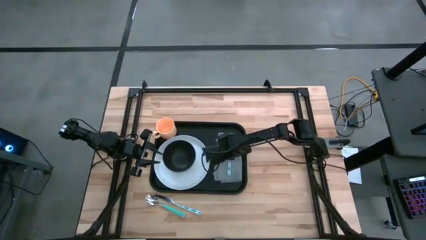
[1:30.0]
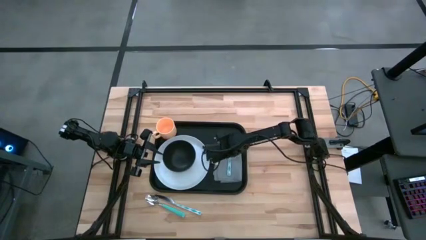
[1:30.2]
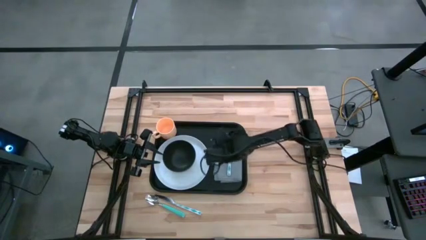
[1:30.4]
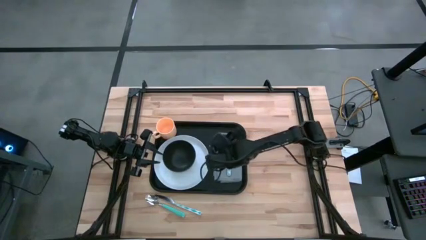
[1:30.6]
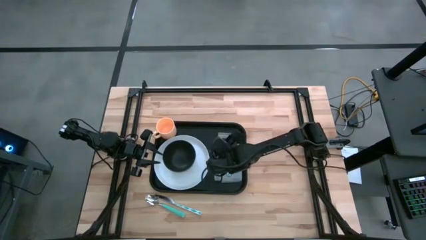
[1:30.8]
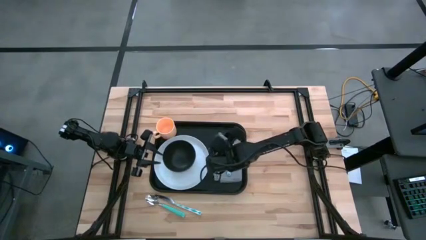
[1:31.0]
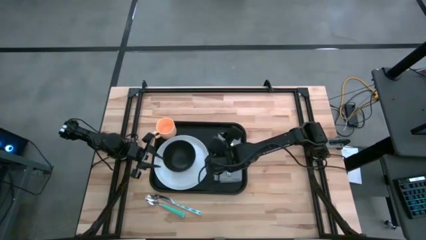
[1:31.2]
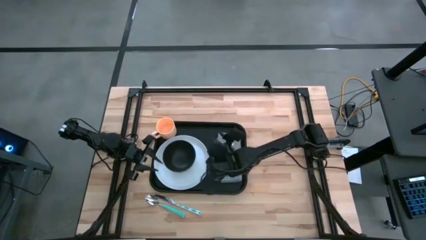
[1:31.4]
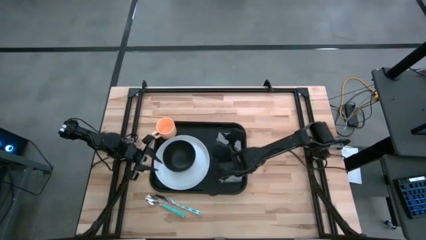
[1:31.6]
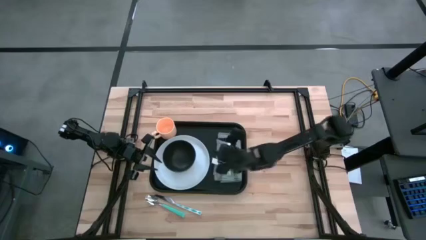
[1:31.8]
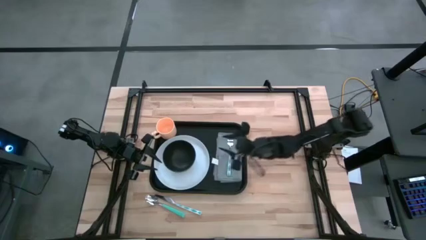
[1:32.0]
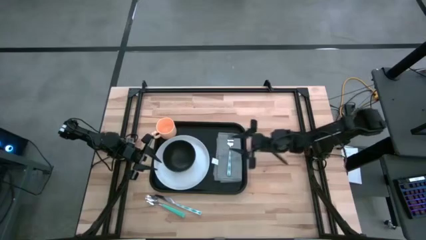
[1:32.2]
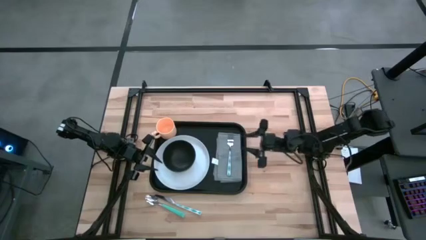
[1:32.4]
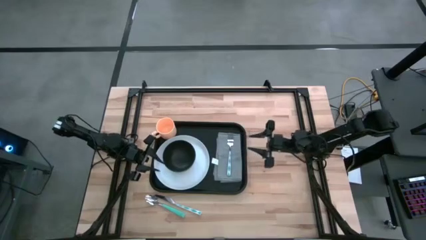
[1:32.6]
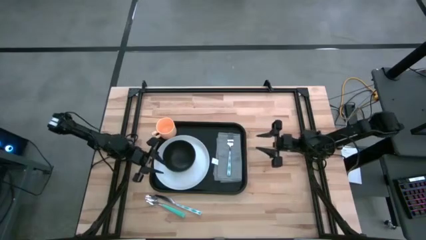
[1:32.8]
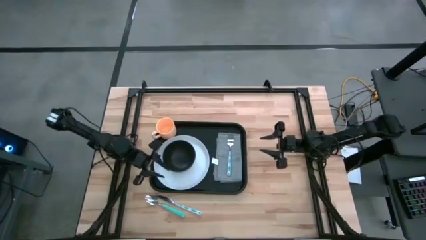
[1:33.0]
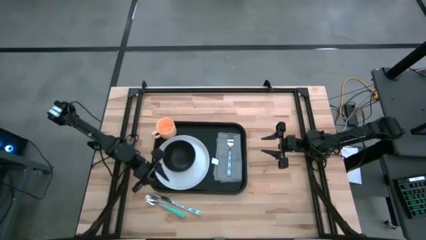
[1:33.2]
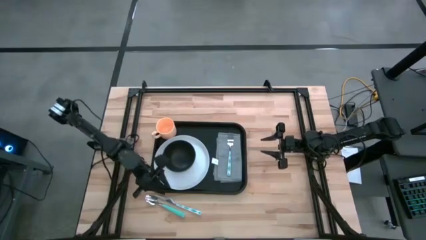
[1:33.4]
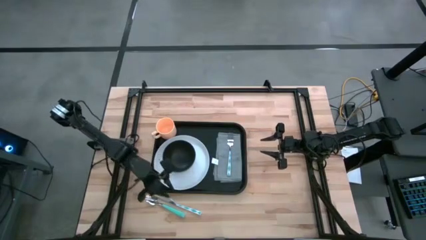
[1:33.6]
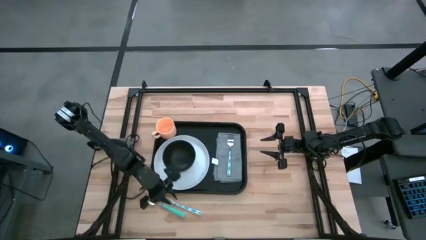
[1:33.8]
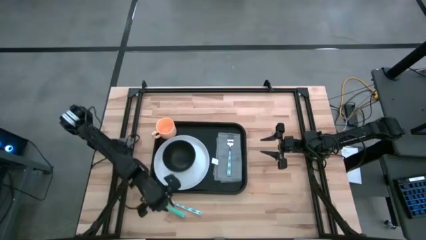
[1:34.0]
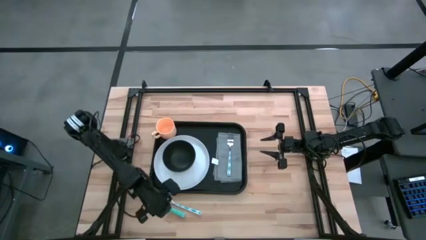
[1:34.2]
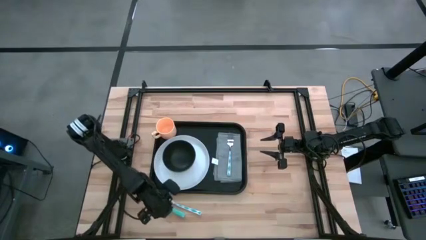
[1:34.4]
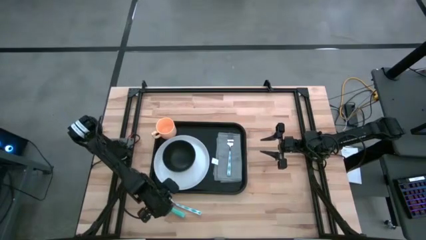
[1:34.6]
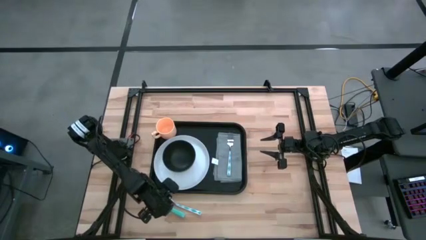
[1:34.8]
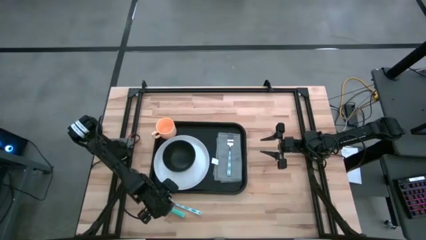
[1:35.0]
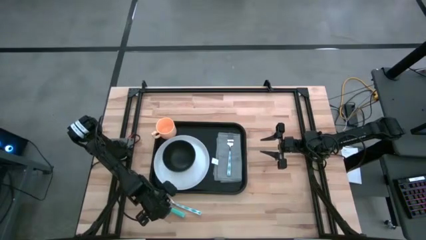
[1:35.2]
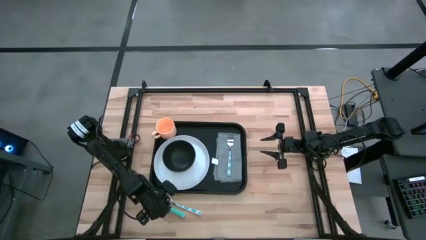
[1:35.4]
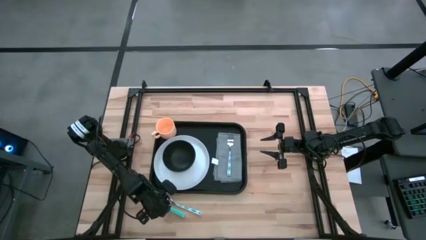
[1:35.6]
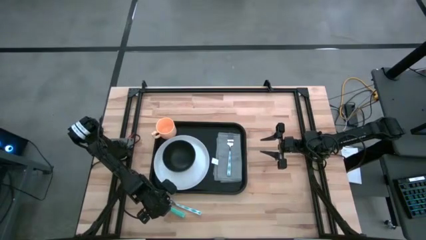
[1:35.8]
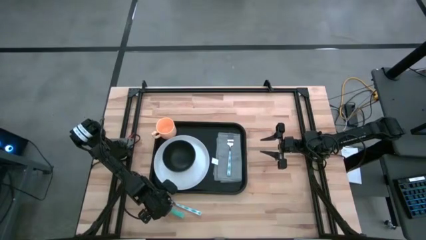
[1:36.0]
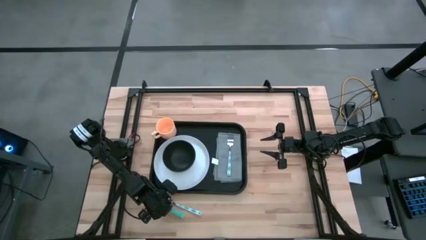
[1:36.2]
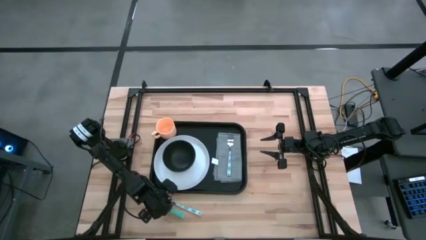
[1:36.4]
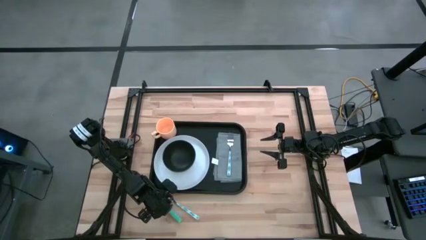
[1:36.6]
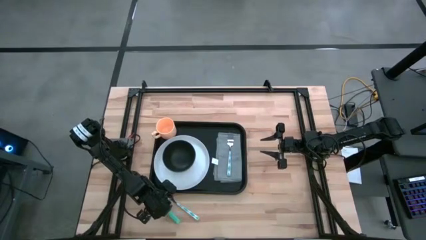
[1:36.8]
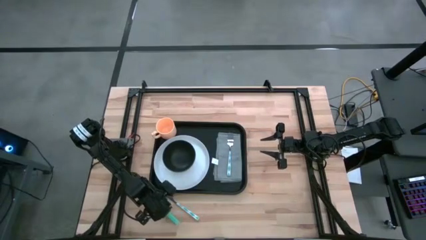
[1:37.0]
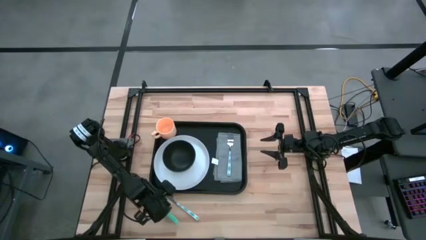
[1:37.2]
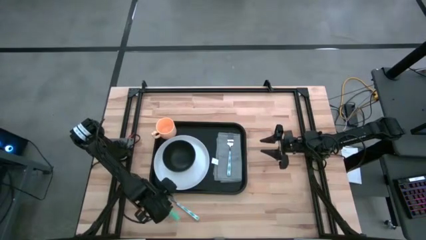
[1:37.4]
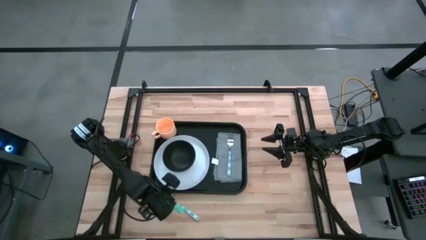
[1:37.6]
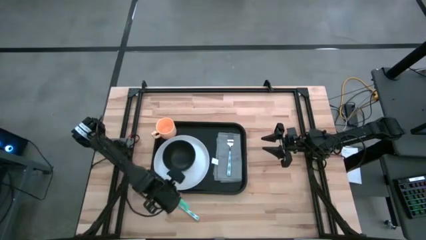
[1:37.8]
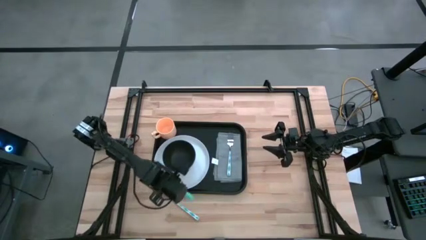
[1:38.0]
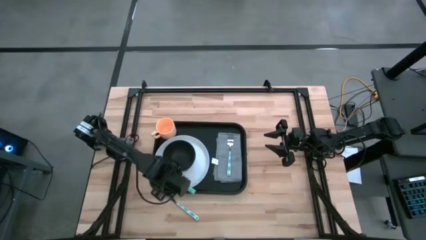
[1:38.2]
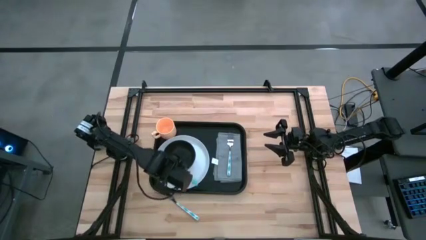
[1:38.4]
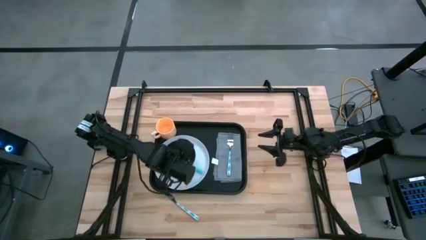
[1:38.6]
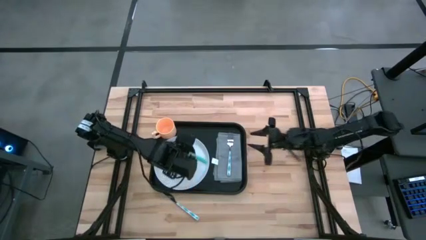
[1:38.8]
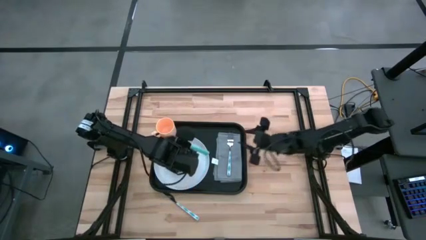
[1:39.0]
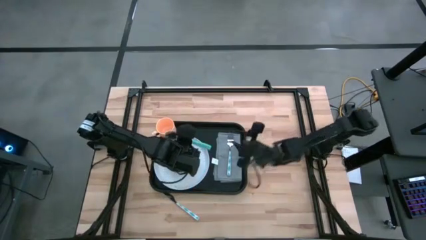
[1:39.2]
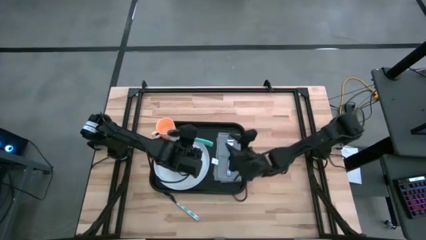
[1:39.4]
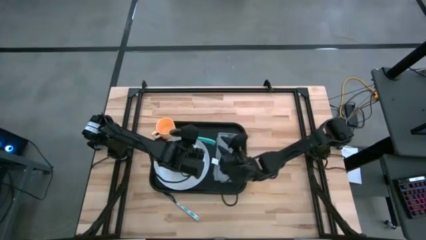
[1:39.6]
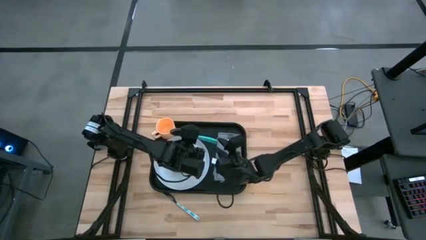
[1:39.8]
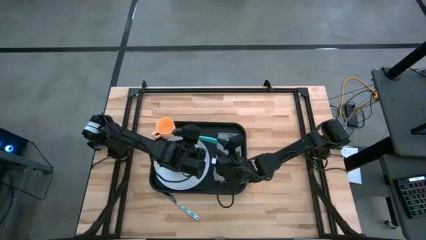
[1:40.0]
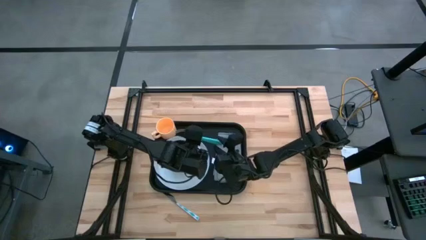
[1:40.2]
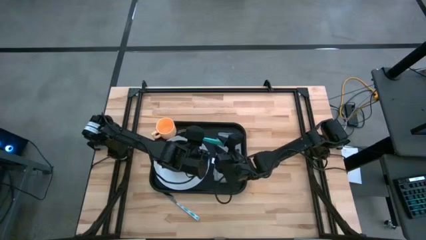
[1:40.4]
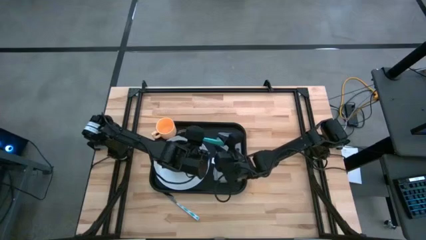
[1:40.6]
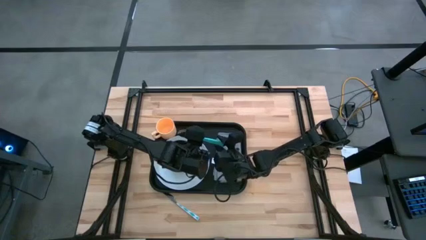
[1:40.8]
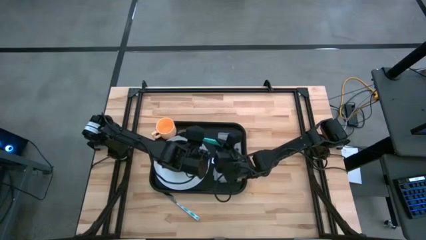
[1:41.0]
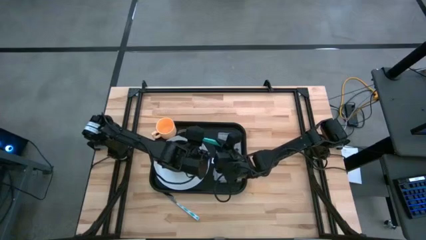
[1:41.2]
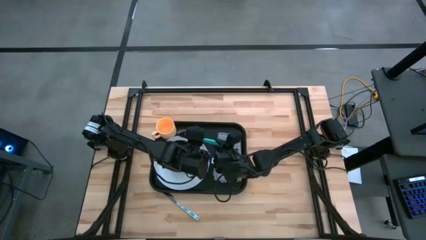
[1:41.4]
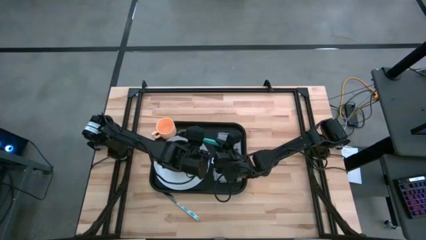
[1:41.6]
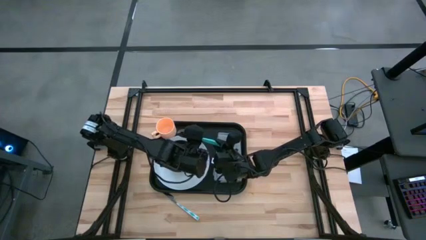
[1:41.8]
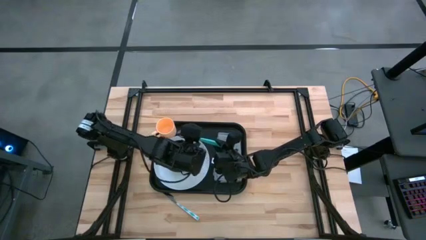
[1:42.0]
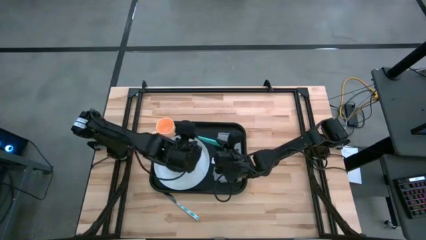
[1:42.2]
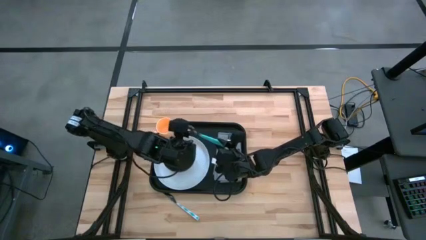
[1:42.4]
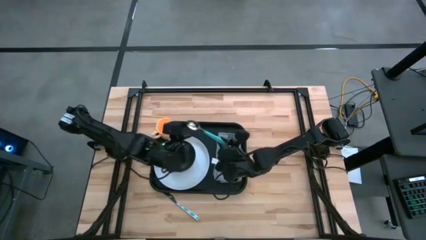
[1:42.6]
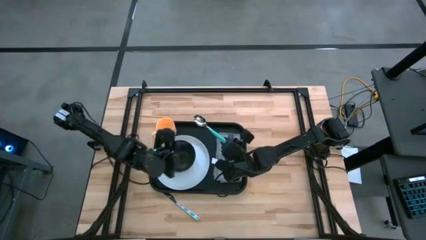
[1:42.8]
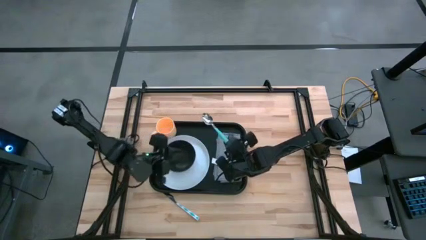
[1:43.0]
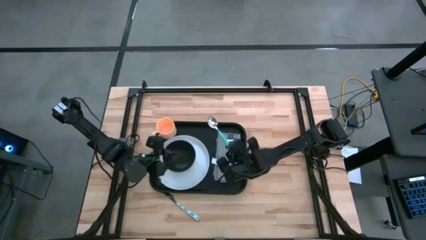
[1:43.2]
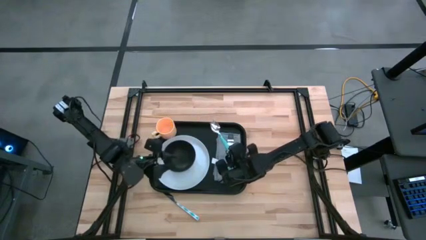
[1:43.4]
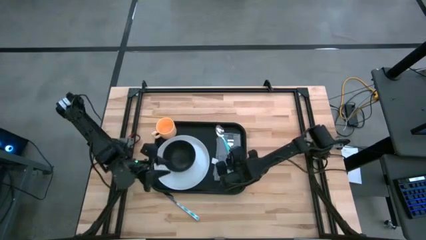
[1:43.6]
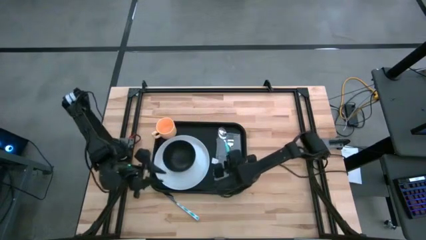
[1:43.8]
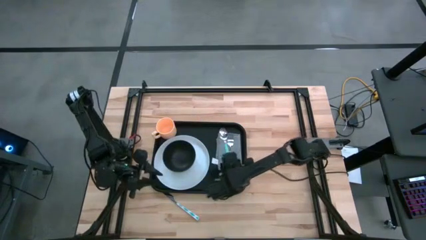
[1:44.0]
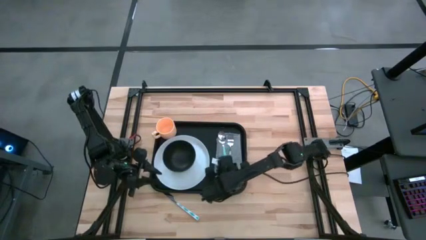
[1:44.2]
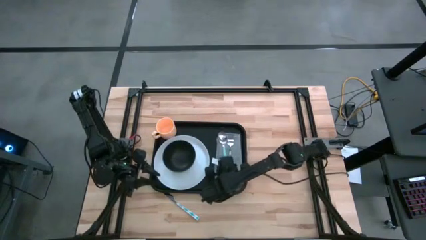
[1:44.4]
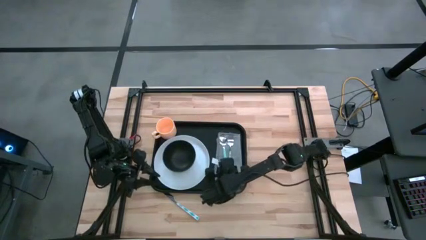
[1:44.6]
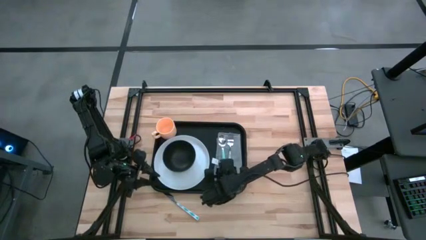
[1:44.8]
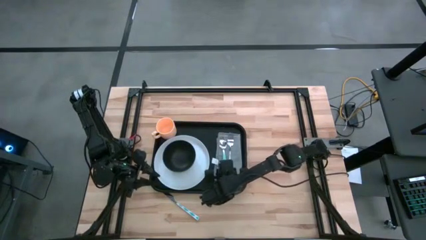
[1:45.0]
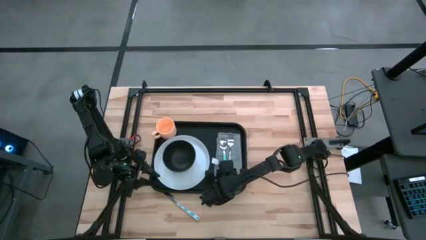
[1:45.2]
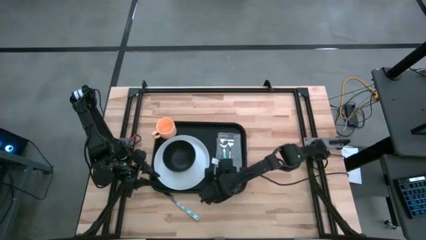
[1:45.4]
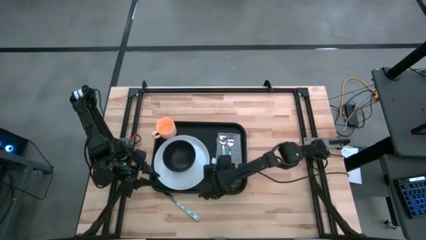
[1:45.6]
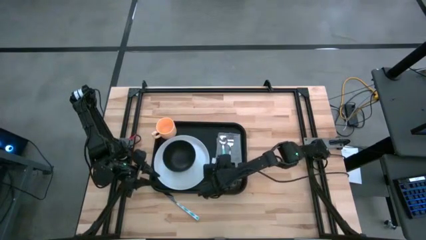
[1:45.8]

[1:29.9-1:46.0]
Task: Set up tray
Put the green spoon on the gray napkin to the left of the green fork
